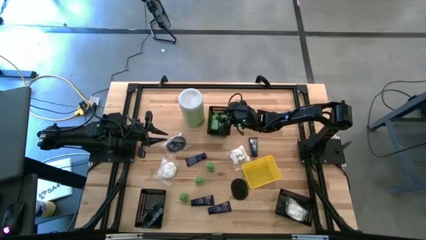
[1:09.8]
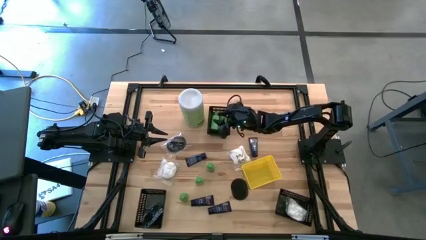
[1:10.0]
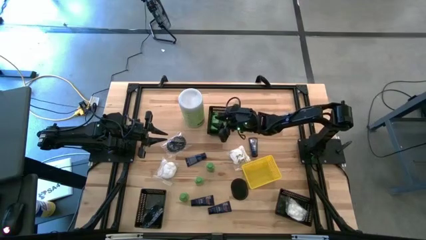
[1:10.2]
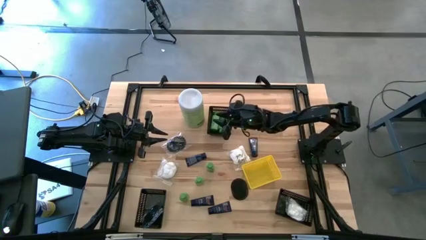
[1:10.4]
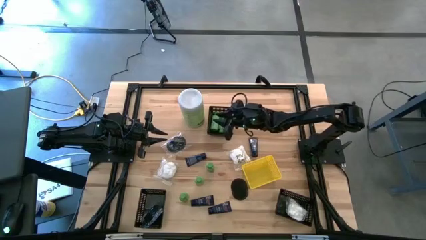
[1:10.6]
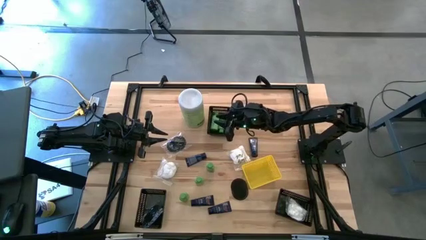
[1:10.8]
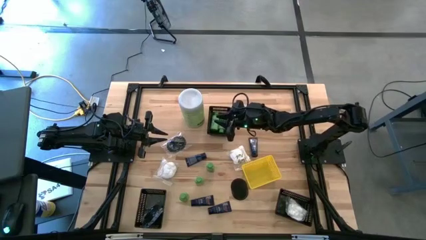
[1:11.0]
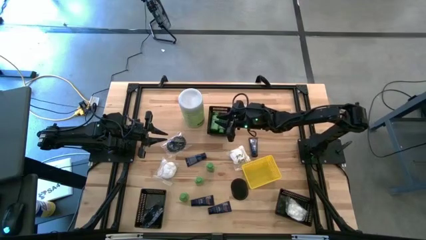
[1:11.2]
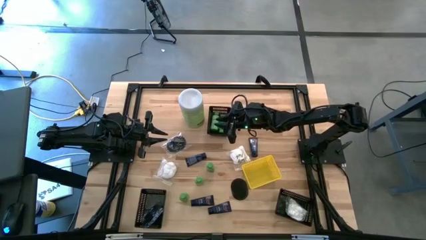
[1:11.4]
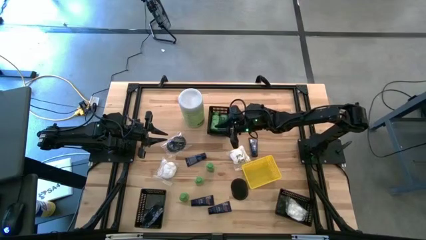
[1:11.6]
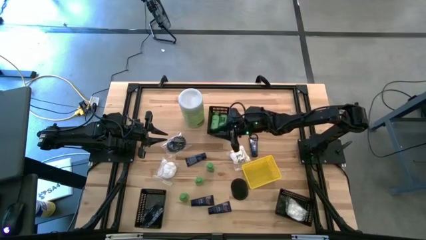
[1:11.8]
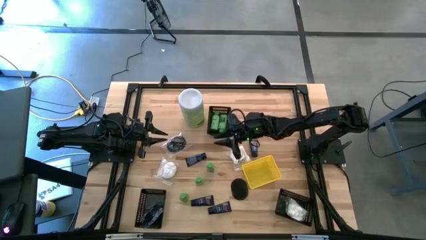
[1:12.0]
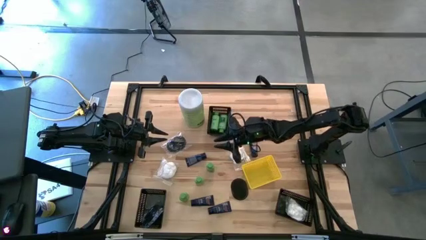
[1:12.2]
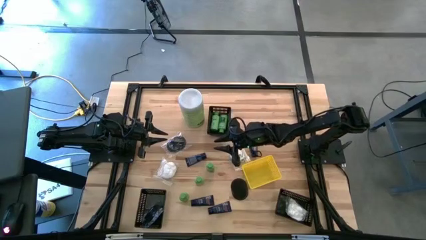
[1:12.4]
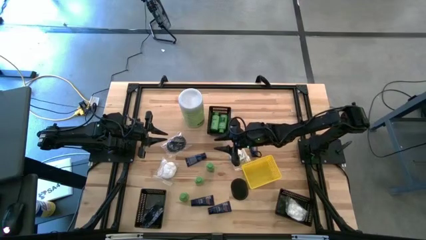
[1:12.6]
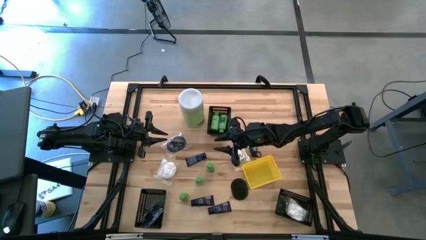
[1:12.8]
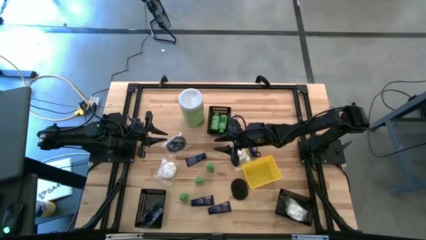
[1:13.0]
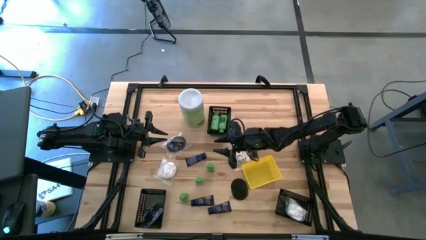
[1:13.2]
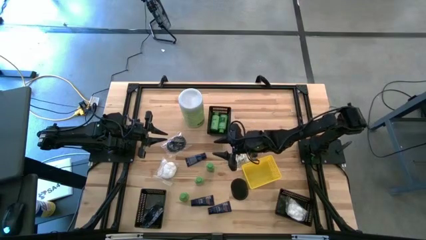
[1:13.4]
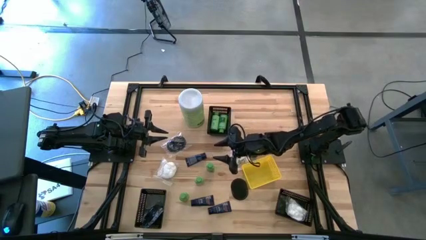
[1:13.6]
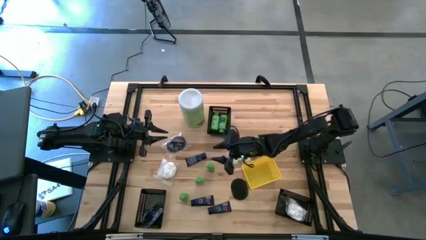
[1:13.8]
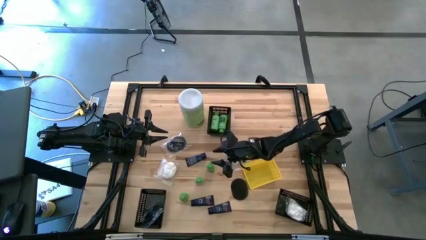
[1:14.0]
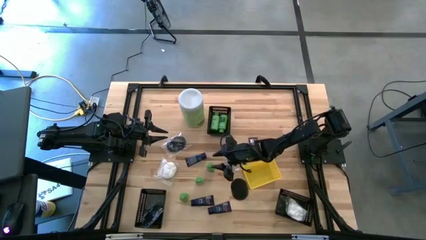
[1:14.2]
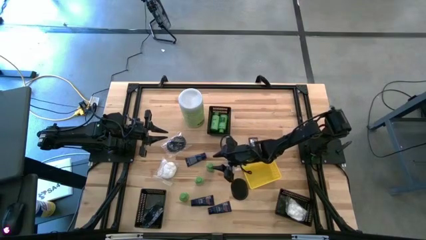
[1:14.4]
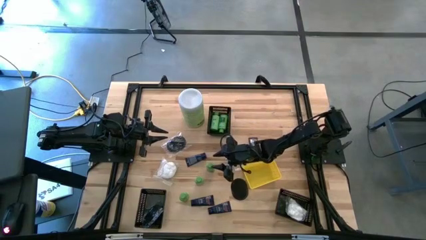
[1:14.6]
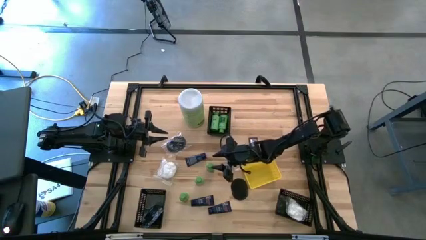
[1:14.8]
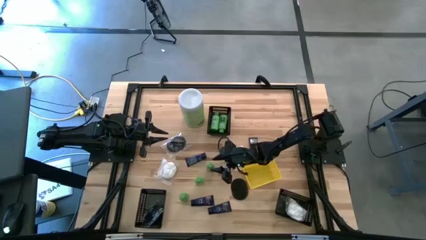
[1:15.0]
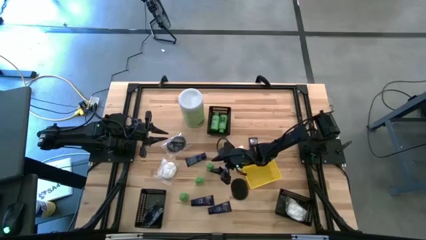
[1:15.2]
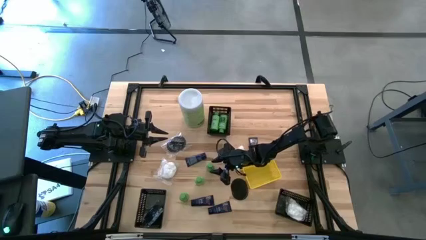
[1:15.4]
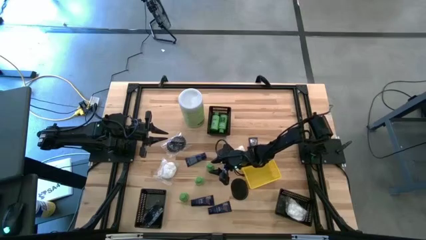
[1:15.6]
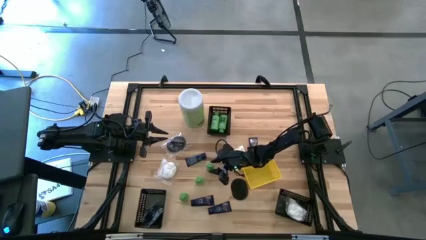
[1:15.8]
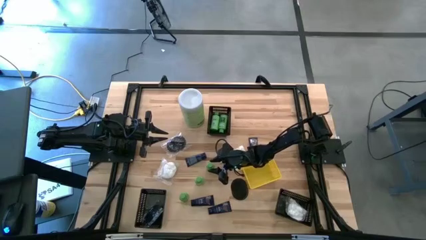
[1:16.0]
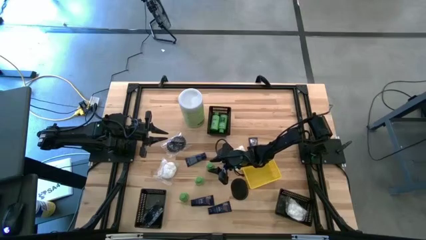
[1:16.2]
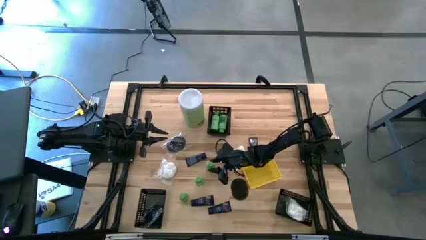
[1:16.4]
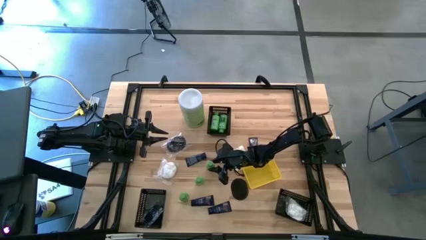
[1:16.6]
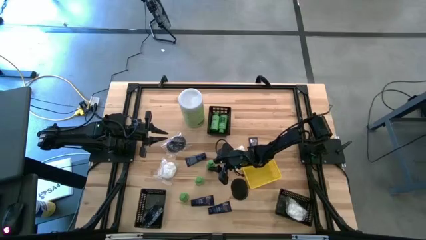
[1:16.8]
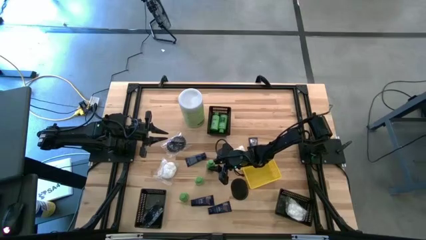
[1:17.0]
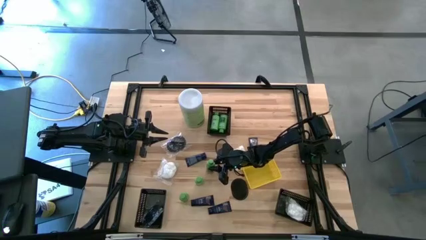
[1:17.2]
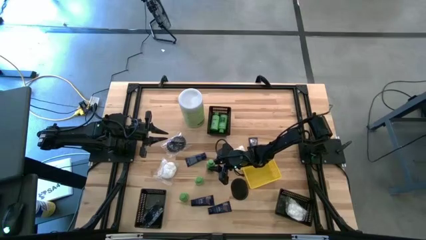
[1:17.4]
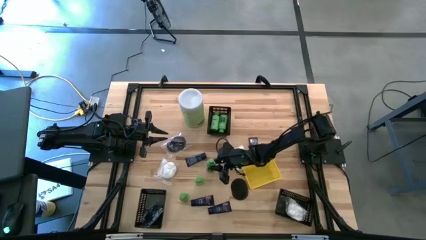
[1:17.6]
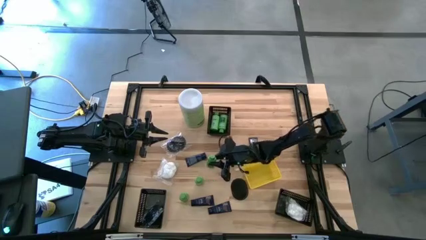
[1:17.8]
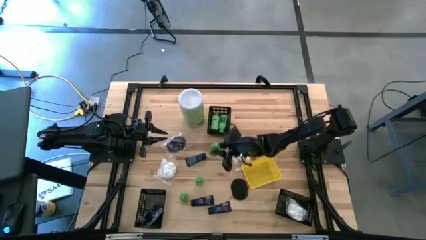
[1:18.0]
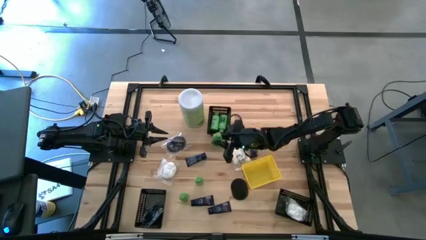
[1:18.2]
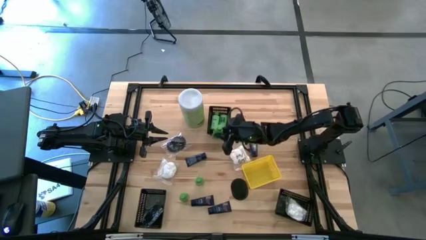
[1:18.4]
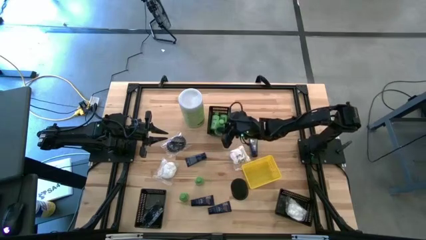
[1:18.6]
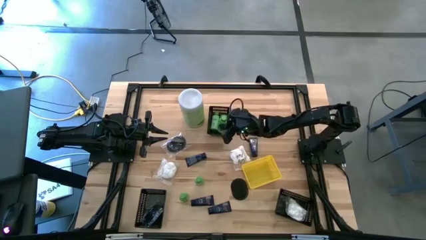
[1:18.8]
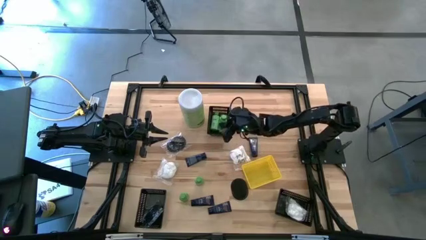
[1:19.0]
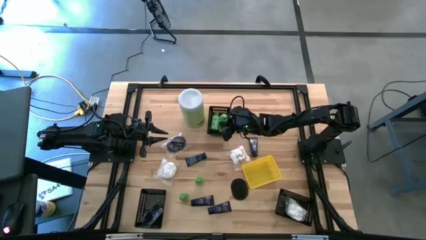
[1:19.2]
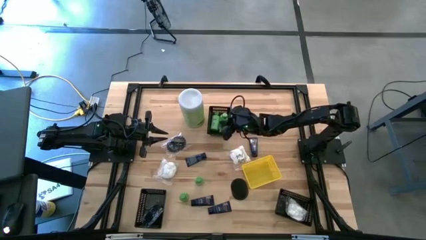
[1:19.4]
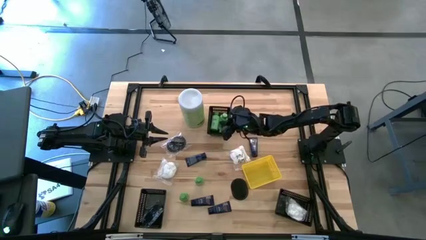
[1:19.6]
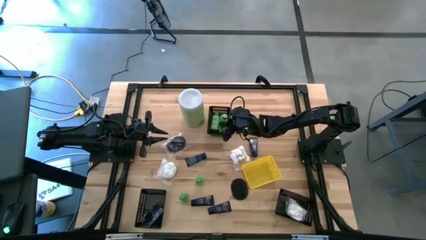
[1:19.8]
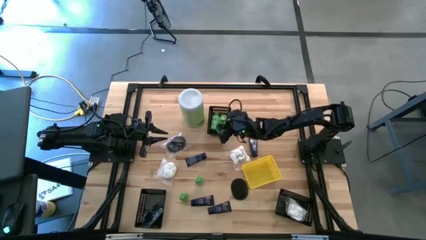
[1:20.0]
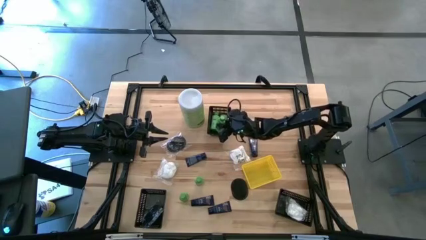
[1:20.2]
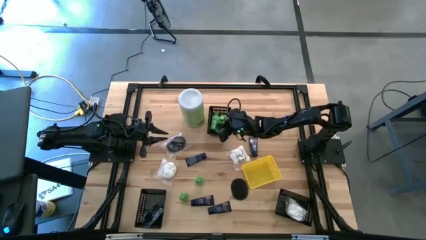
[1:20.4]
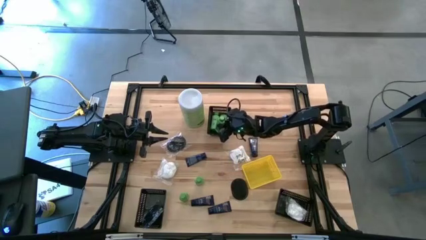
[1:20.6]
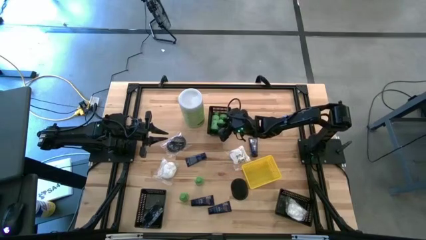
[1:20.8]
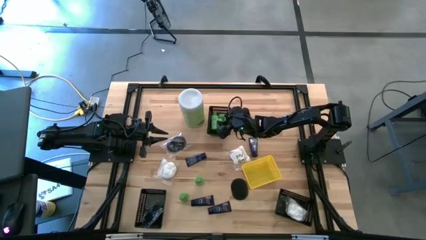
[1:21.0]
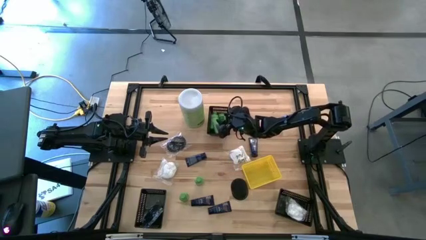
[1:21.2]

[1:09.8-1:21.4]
Task: Pick & Place Travel size toiletries
Put the green shampoo bottle into the top black bin
